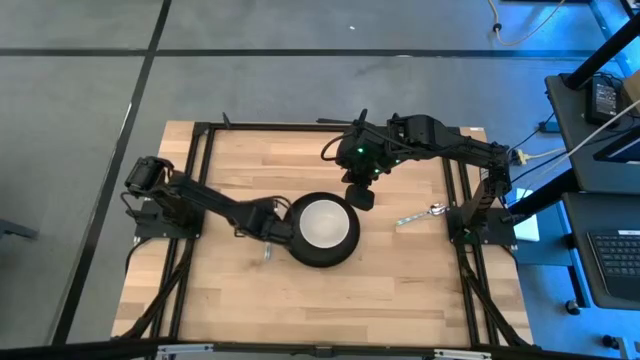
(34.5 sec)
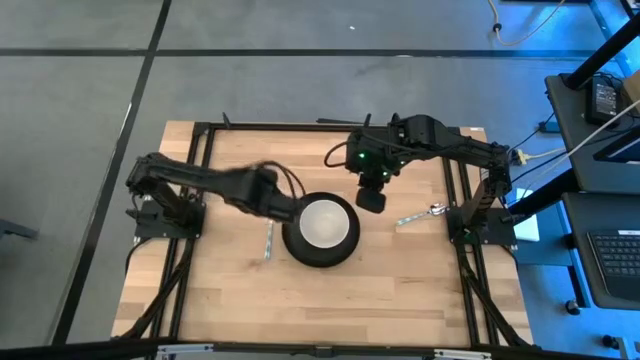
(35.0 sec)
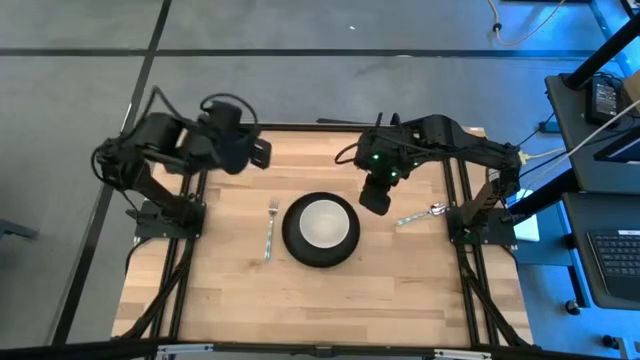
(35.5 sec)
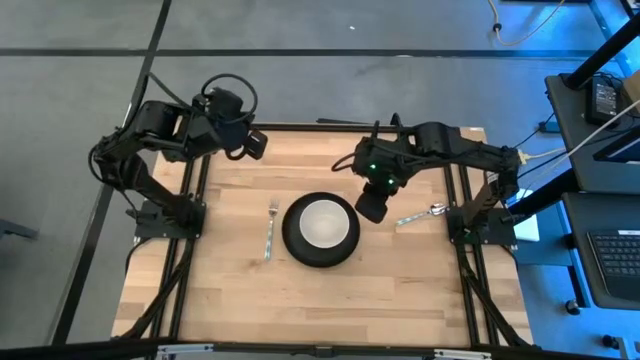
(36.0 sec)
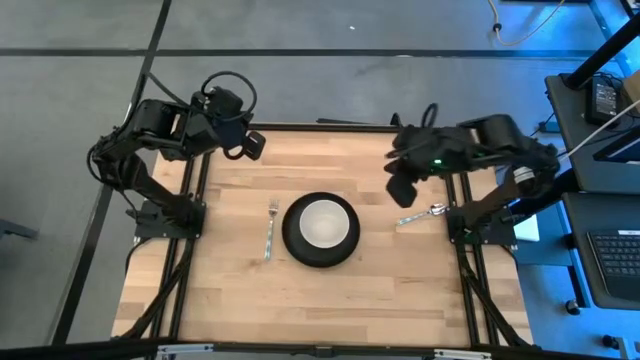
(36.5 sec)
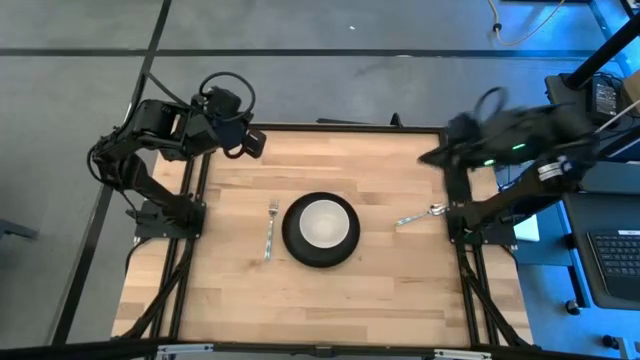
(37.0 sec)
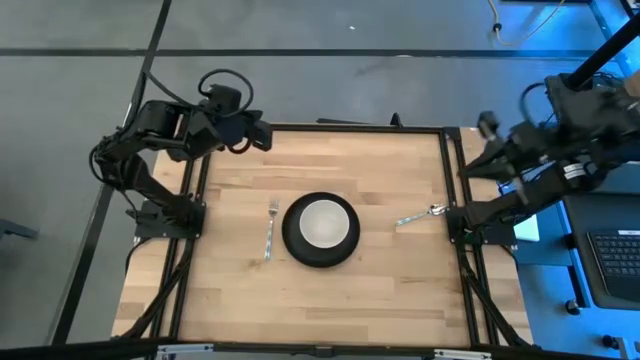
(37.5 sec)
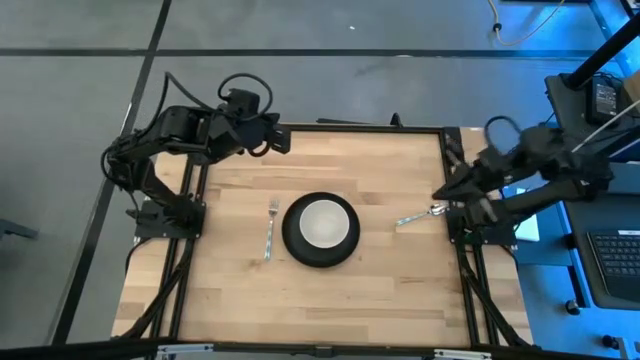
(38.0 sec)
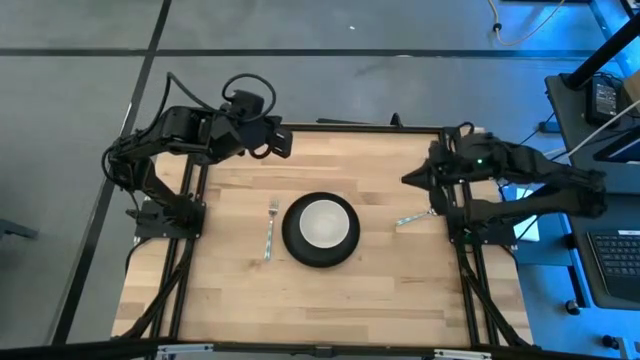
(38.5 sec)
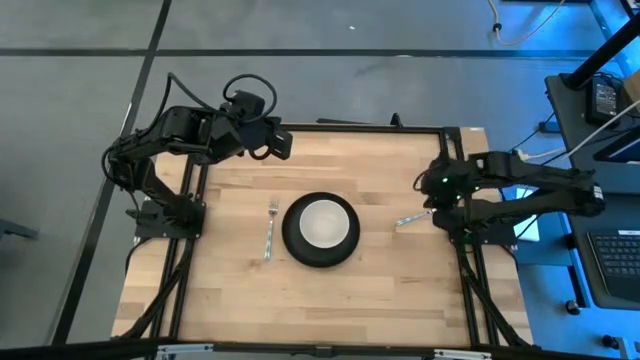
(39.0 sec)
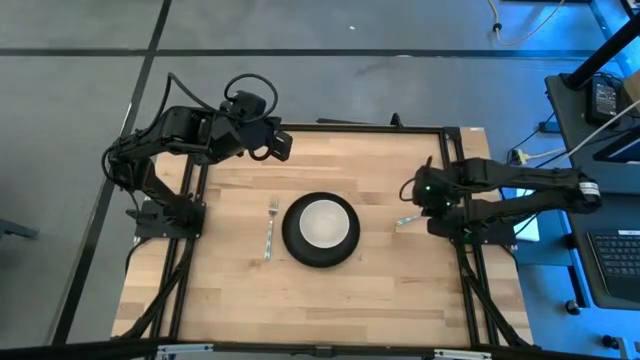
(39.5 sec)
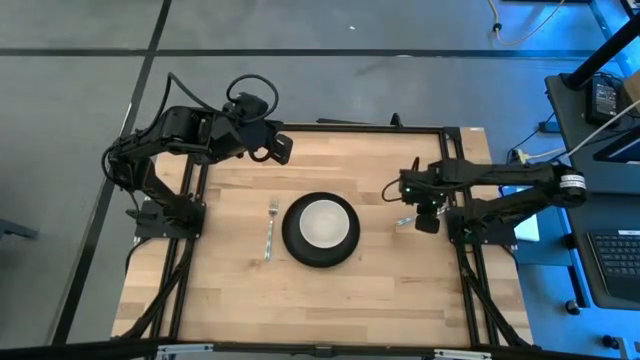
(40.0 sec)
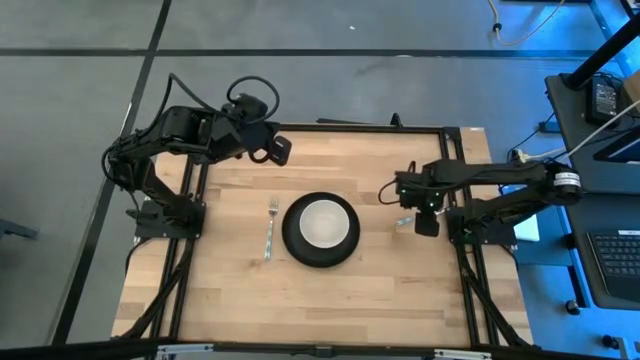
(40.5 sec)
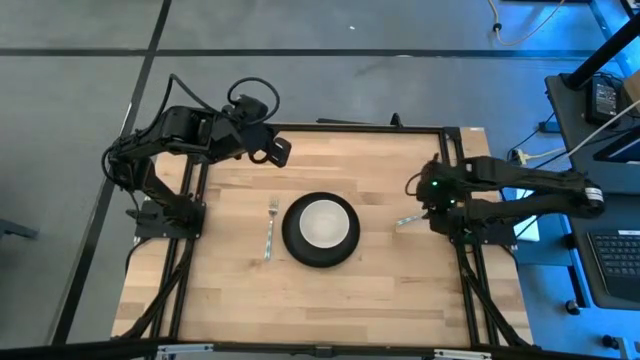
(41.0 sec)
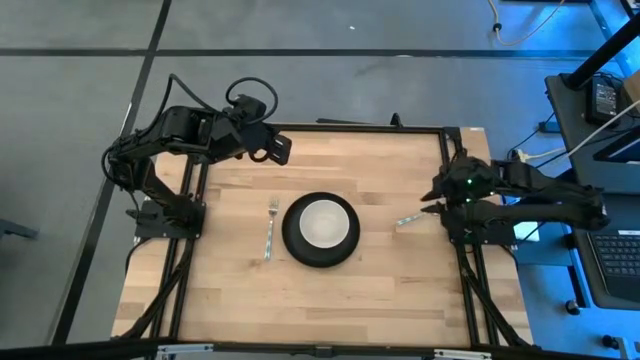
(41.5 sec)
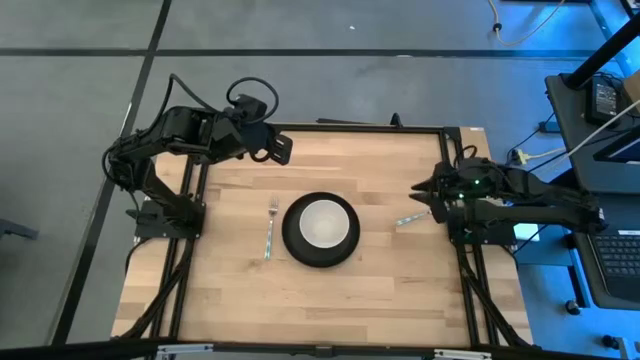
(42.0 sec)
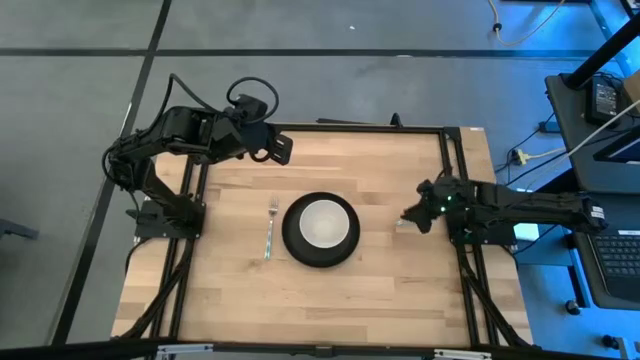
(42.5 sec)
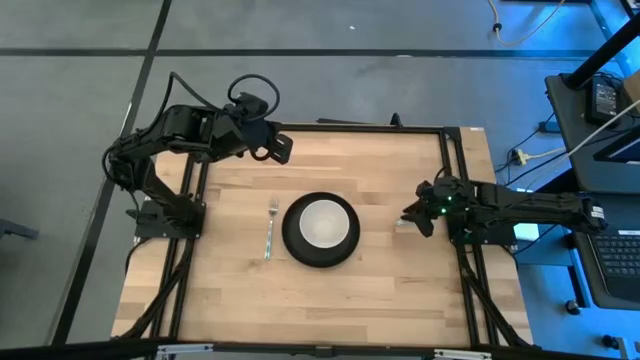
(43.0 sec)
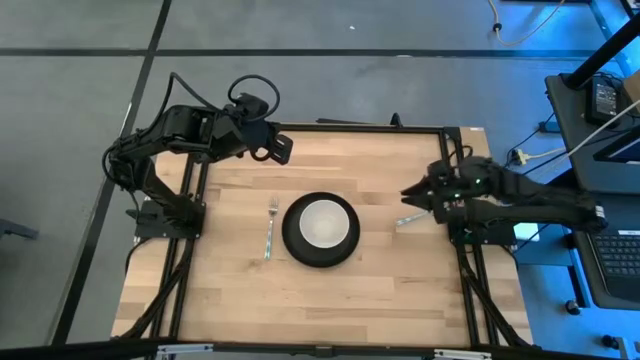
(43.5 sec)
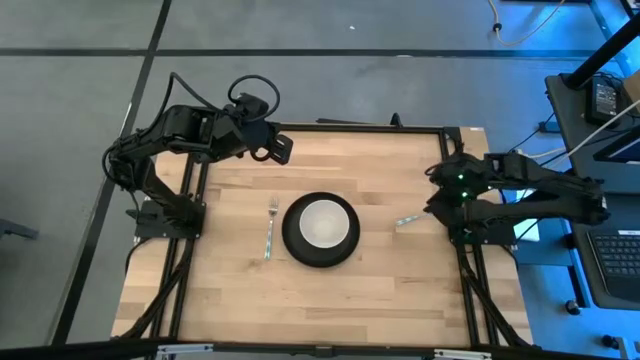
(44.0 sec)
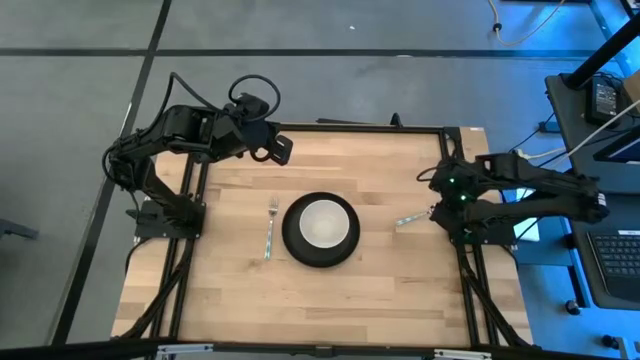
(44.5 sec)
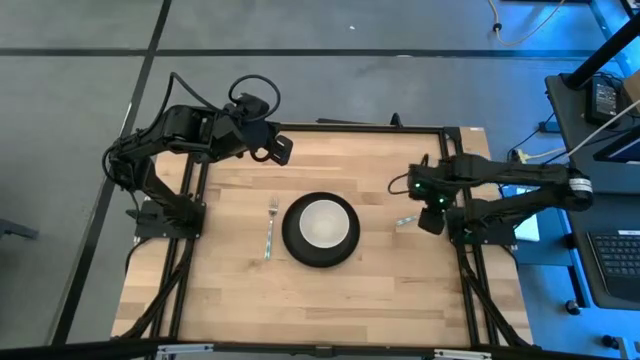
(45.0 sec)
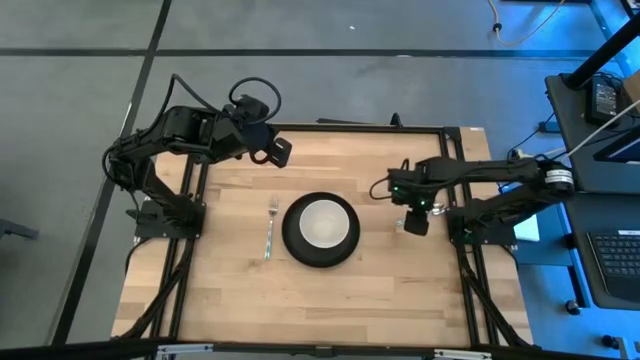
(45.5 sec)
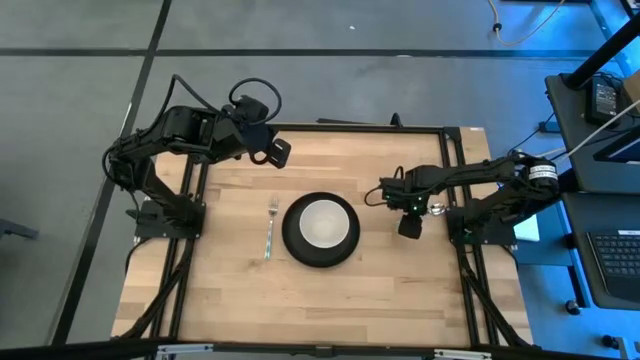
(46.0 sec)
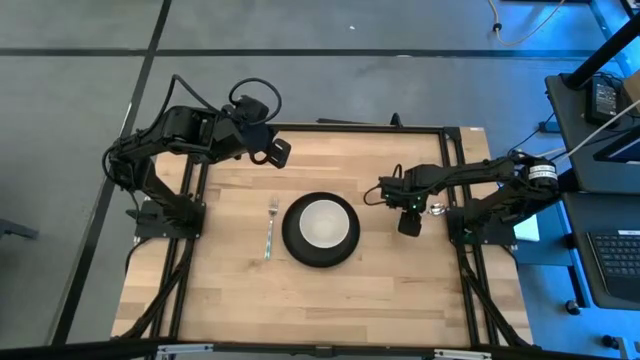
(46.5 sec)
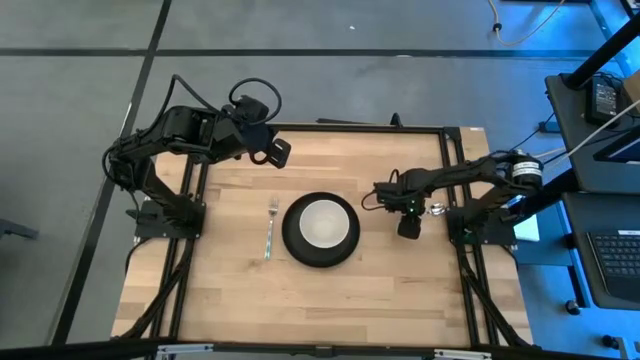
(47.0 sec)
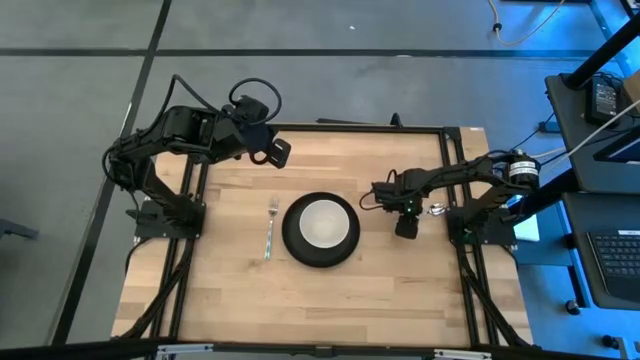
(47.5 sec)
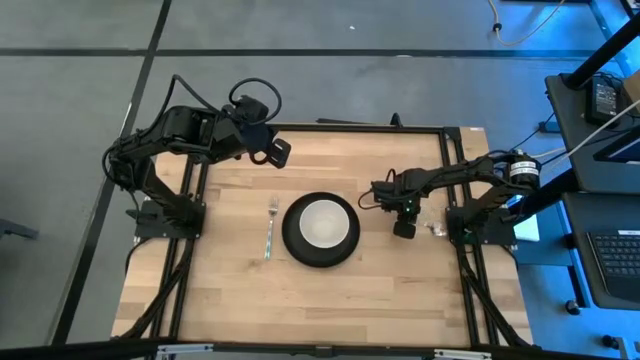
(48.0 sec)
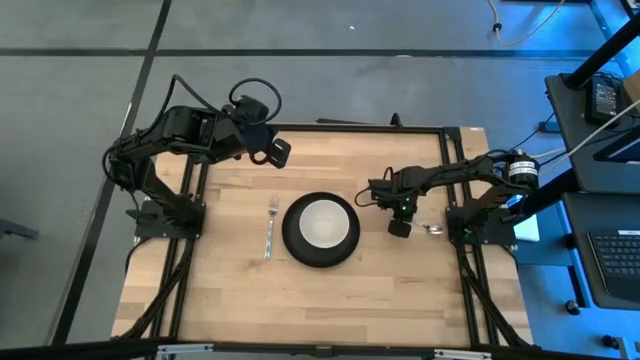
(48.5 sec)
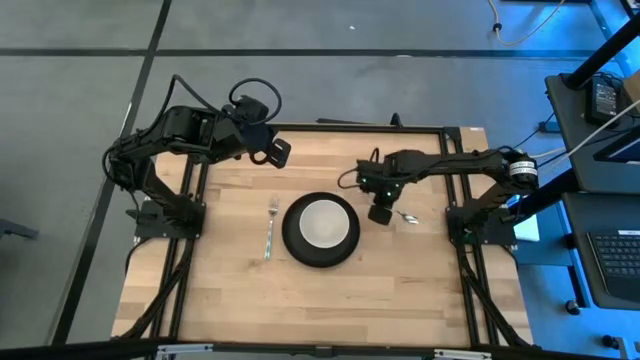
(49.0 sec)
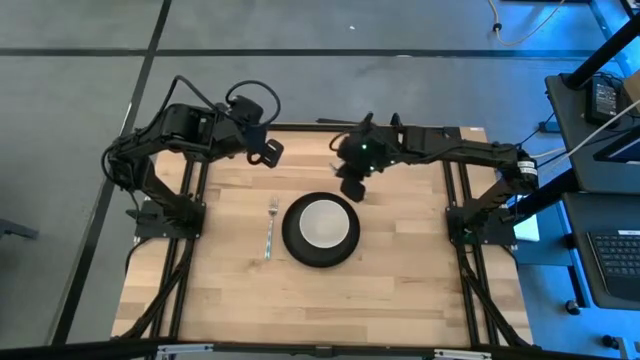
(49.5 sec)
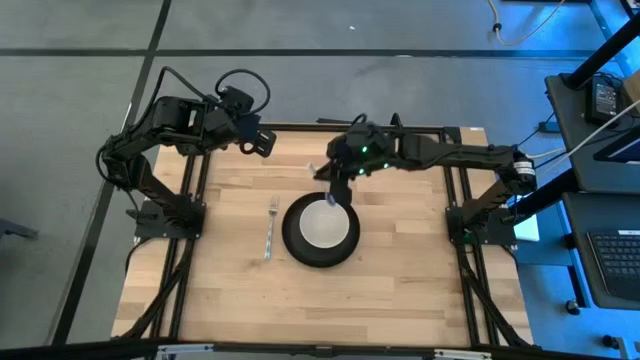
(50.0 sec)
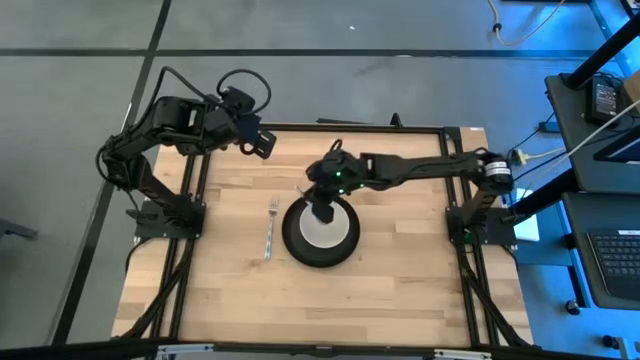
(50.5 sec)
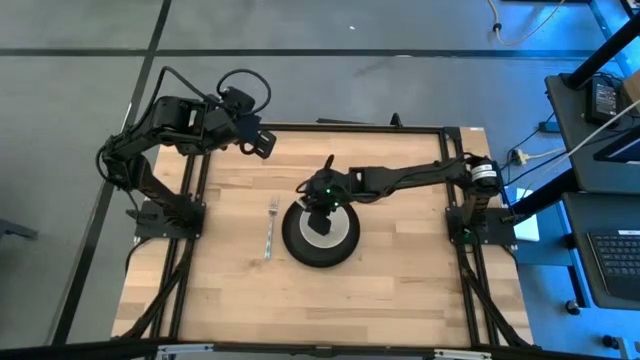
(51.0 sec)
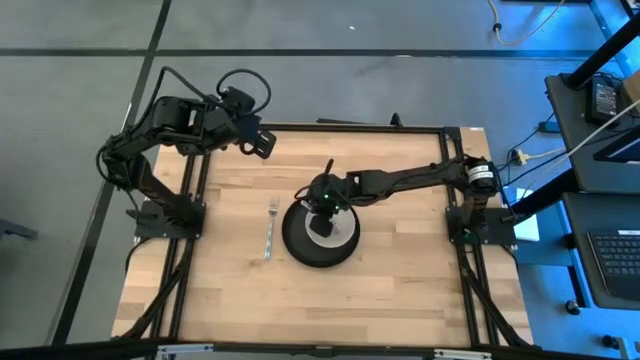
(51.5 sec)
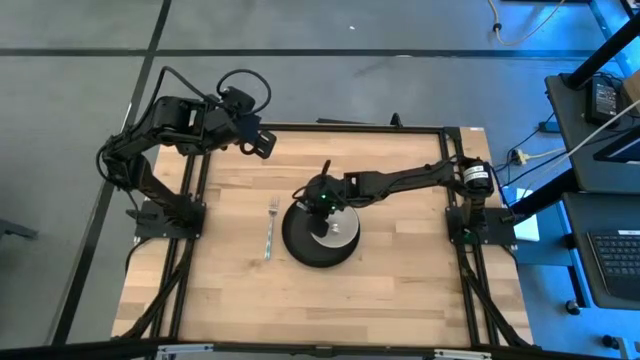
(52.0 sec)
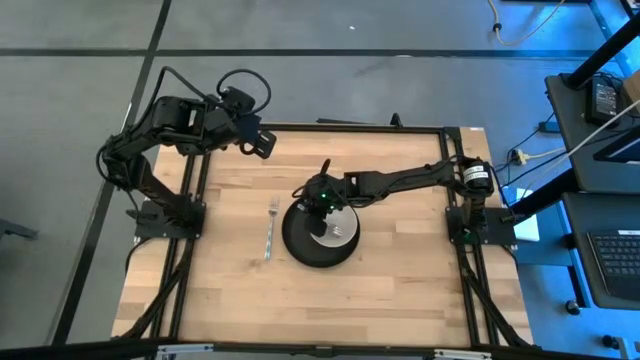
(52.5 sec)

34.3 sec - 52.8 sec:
Task: Pick and place plate/cup/fork/spoon on tray
Put the green patterned spoon into the white bowl

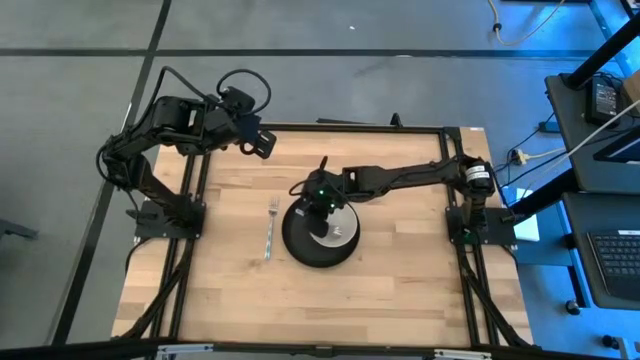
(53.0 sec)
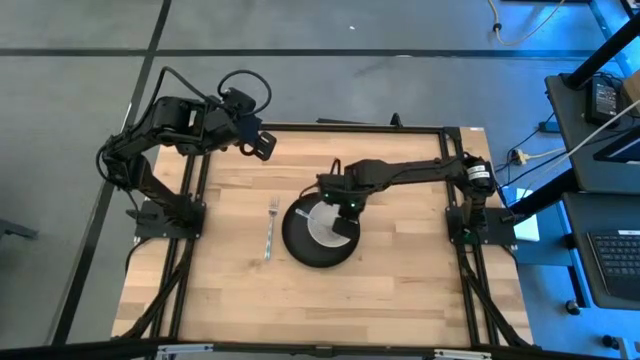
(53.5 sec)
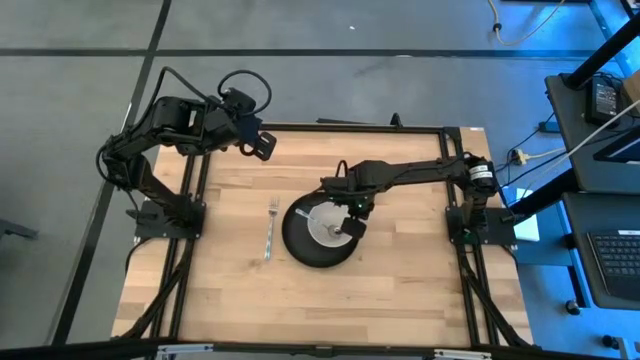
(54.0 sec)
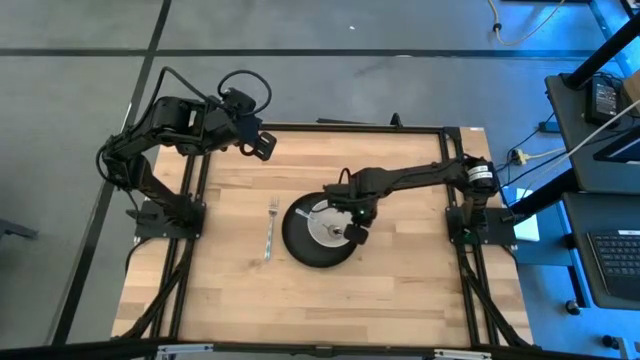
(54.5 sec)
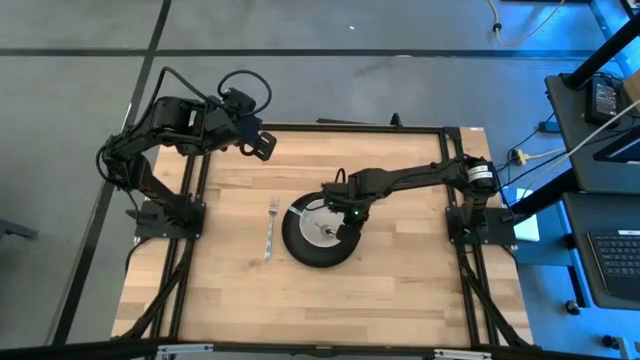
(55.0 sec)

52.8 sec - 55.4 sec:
Adjust the white bowl

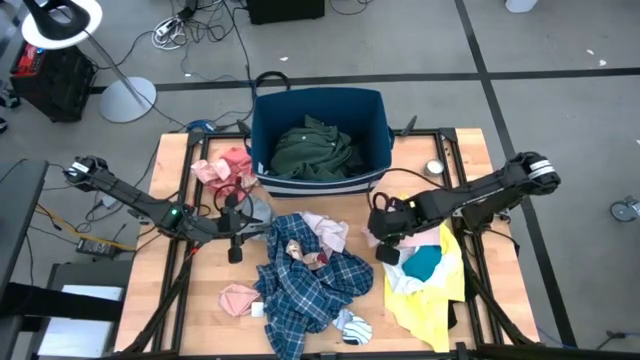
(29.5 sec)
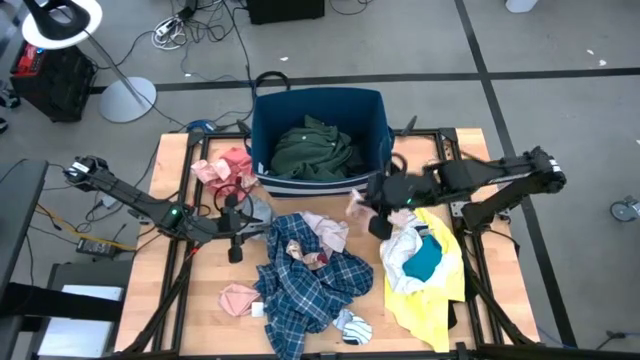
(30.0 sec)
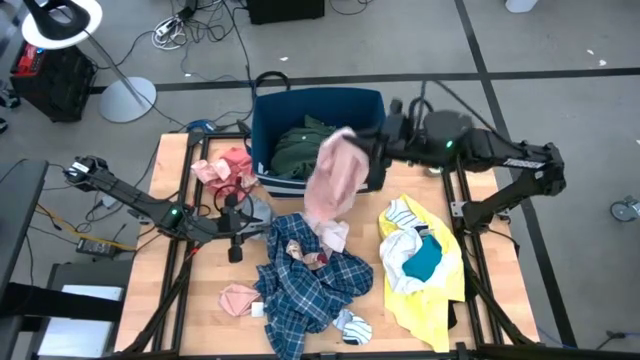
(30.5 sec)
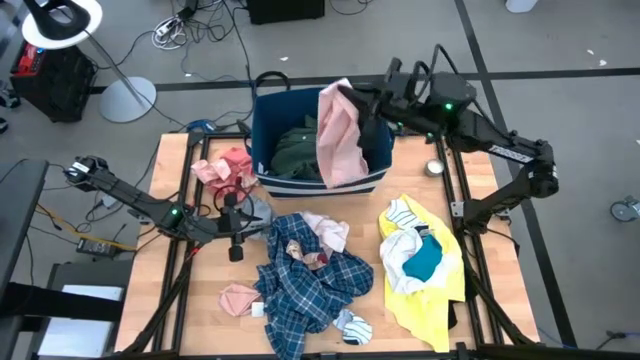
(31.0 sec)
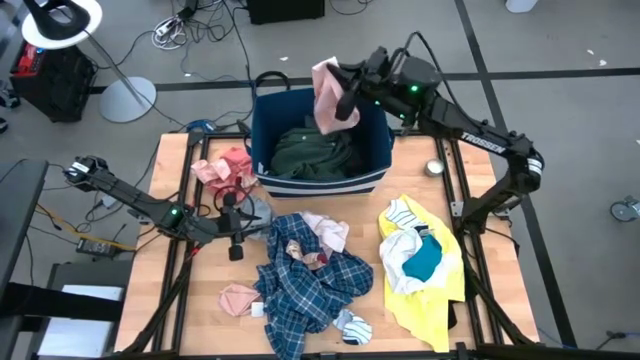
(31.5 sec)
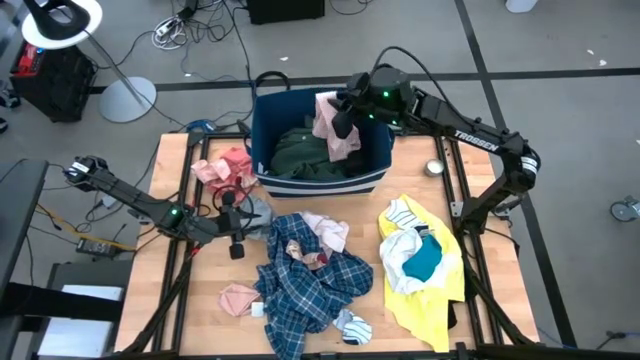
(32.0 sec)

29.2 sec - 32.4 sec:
Task: Sort clothes
Put the pink underwear into the blue bin
